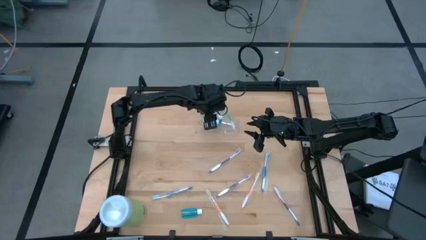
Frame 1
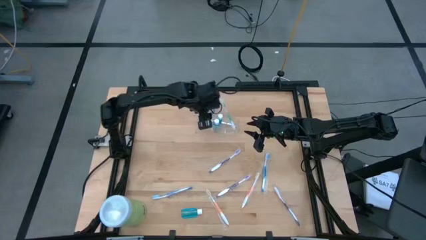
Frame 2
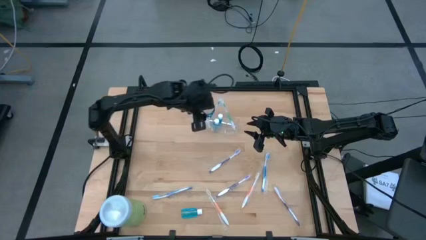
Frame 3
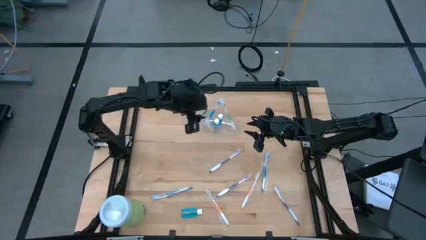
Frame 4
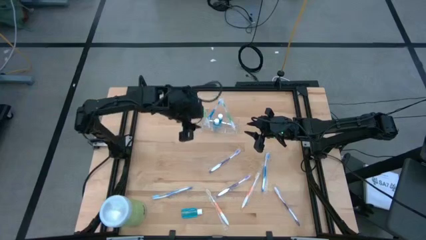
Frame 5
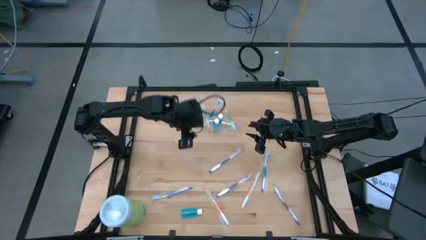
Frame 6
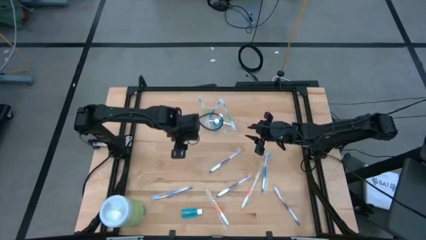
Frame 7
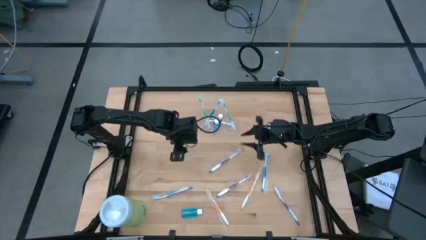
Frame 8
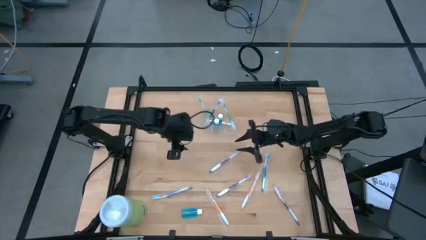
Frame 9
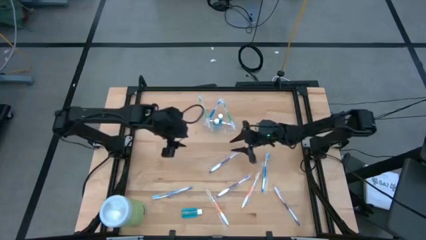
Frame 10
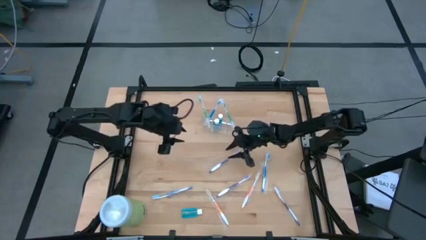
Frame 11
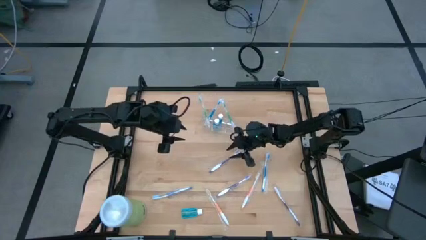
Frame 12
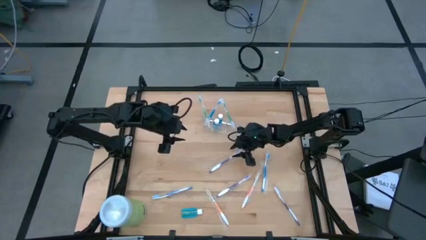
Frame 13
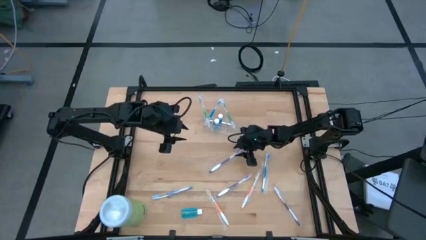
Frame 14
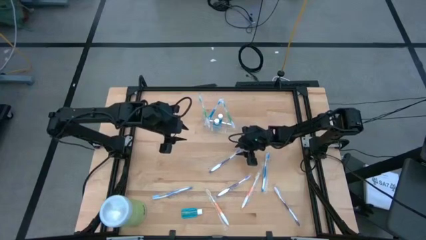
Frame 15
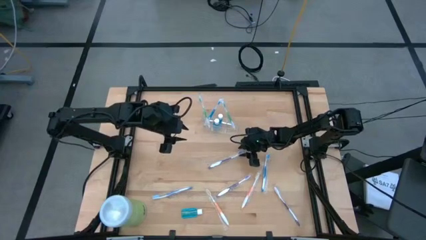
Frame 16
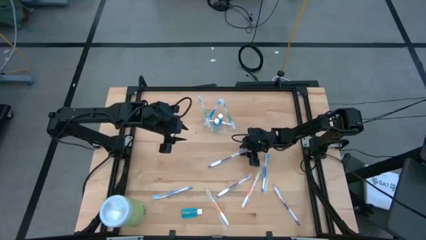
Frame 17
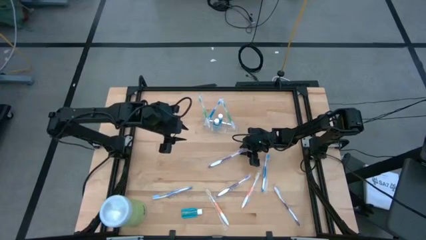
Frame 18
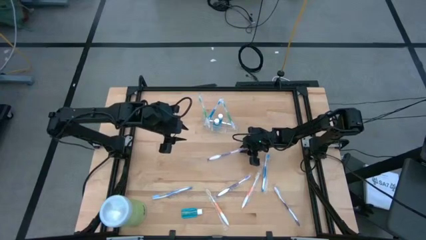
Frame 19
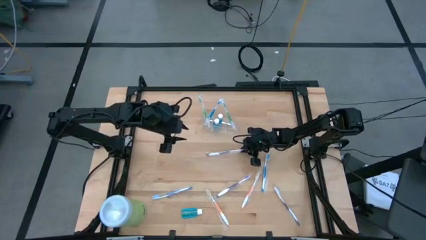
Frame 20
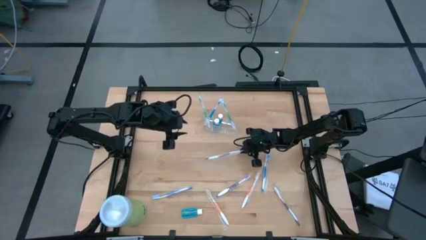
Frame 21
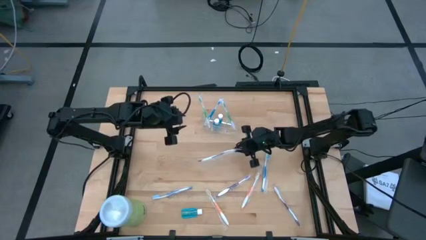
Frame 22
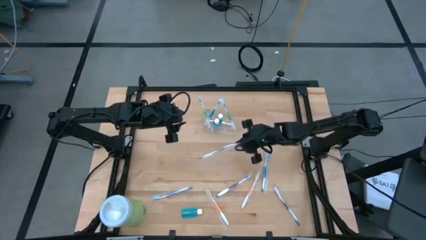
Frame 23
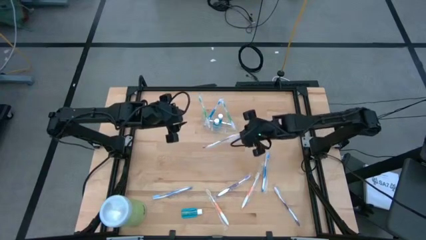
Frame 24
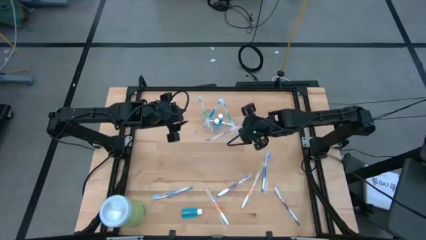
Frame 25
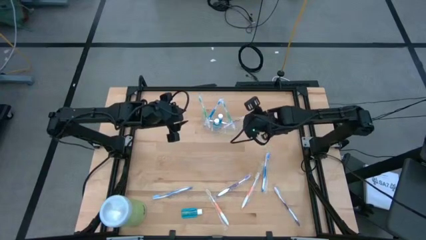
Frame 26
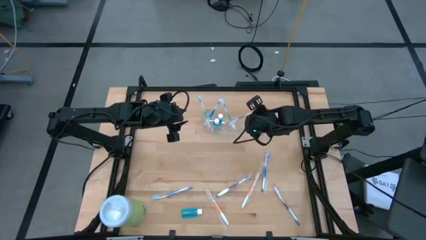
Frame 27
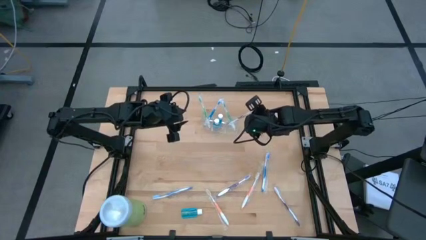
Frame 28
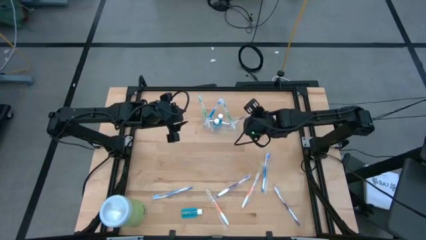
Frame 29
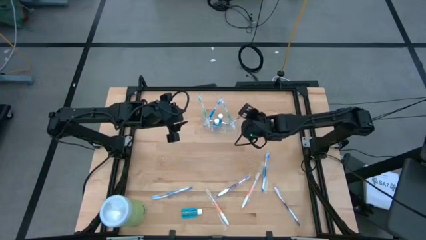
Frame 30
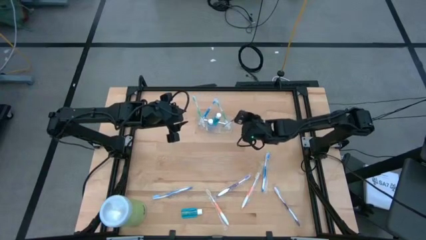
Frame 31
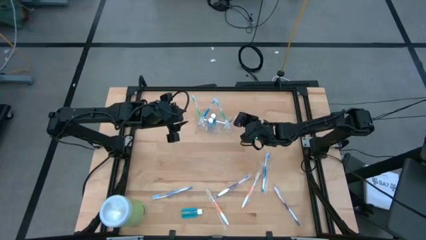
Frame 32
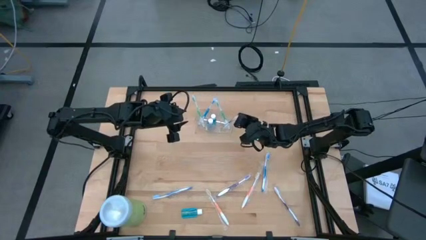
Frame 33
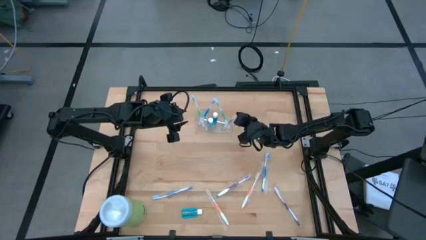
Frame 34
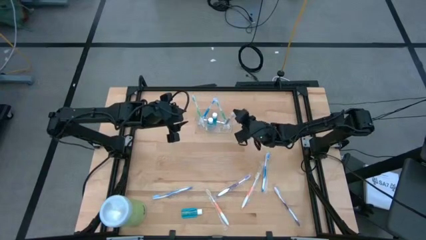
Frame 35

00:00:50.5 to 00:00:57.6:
Task: Pick & Place toothbrushing station
Put the top purple toothbrush into the right section of the transparent organizer

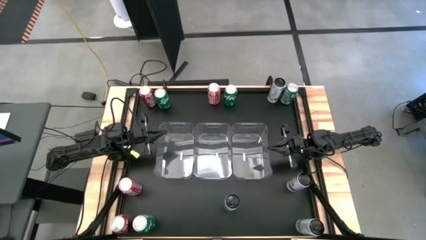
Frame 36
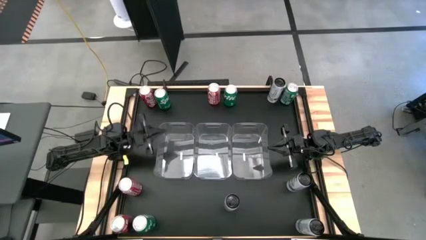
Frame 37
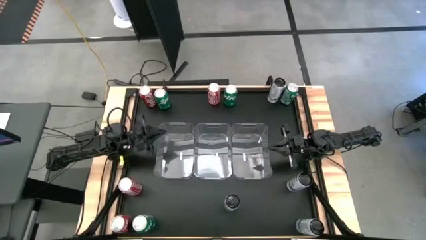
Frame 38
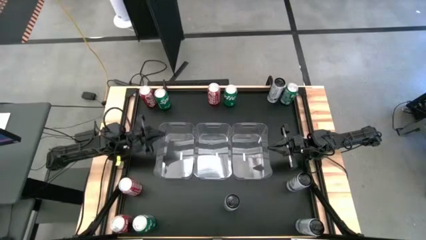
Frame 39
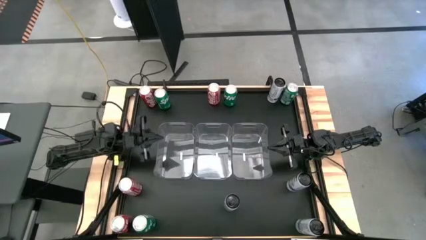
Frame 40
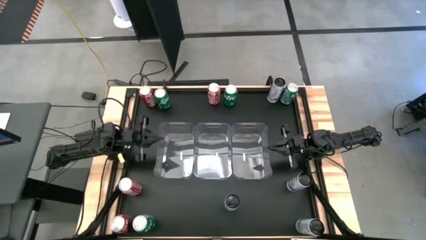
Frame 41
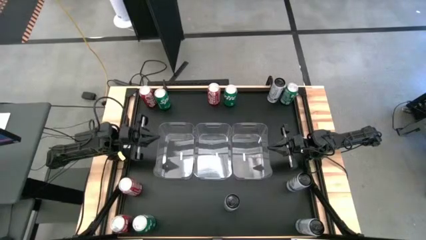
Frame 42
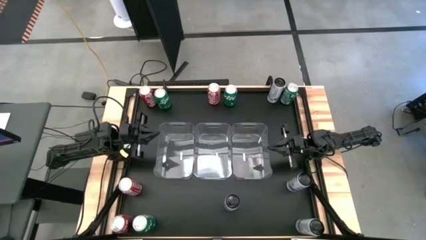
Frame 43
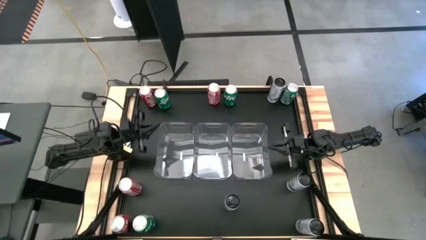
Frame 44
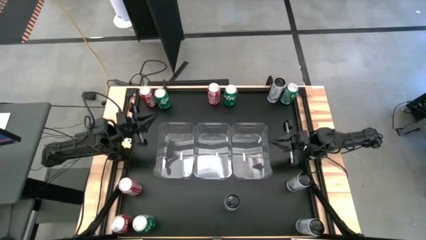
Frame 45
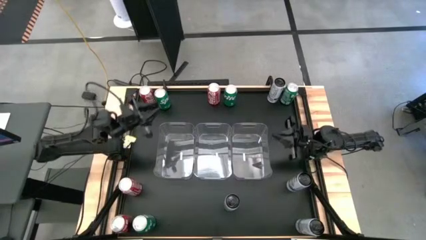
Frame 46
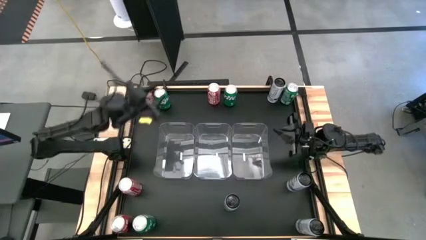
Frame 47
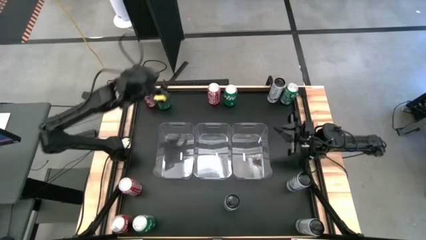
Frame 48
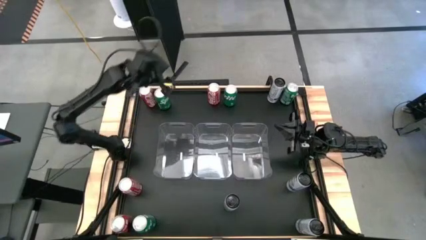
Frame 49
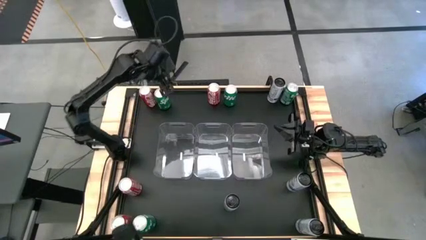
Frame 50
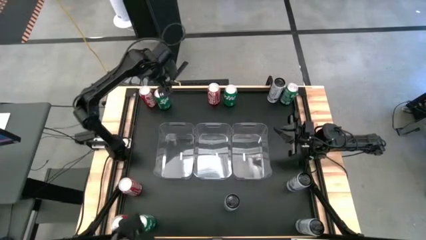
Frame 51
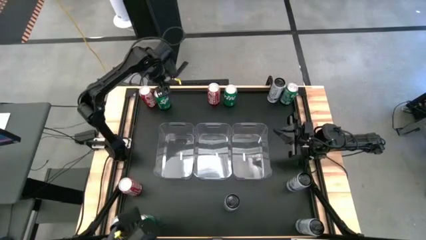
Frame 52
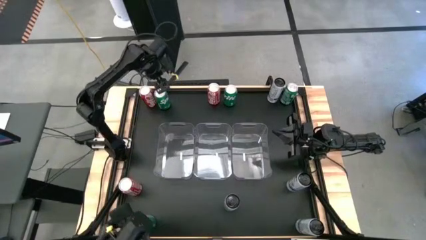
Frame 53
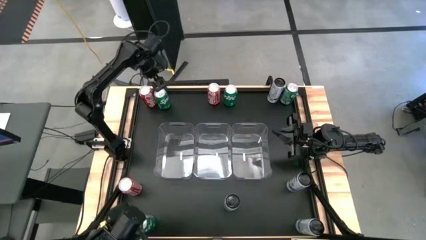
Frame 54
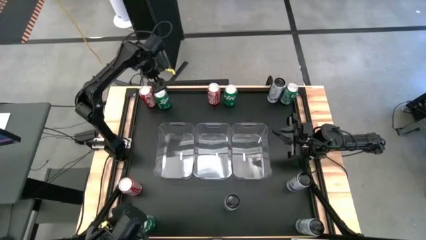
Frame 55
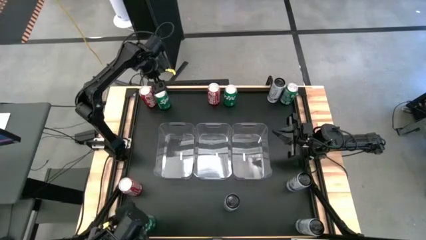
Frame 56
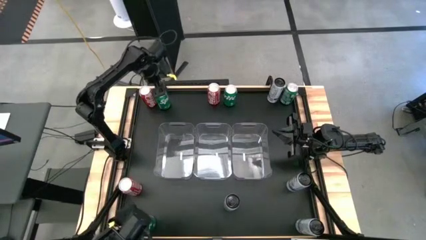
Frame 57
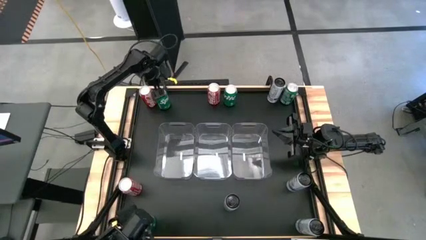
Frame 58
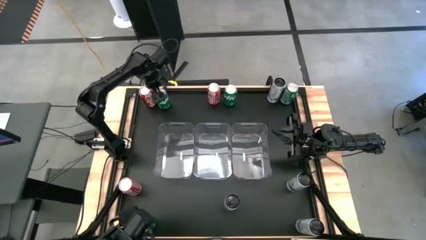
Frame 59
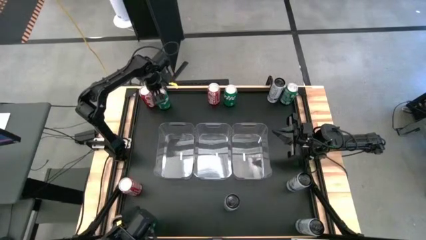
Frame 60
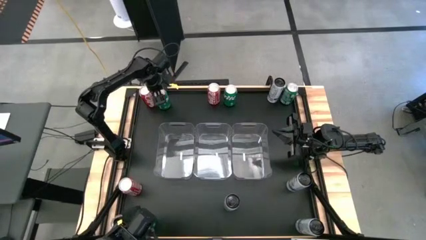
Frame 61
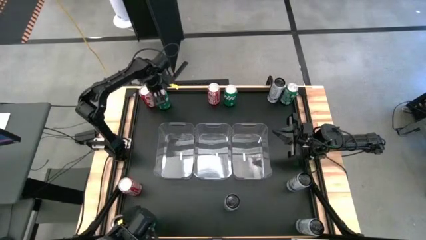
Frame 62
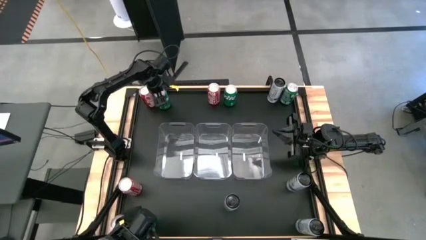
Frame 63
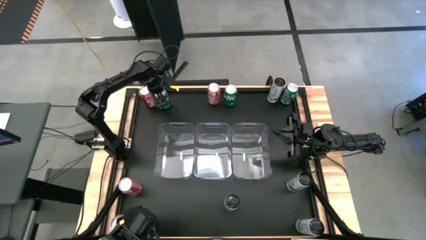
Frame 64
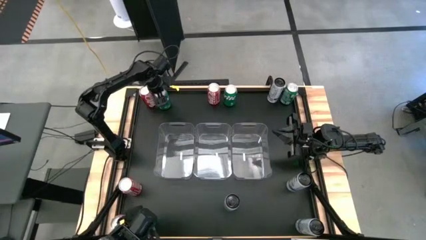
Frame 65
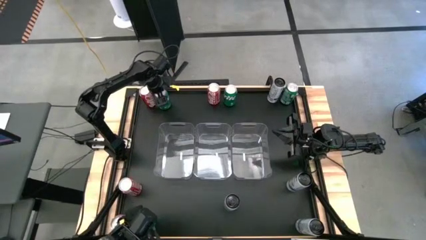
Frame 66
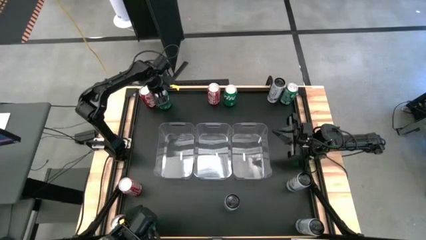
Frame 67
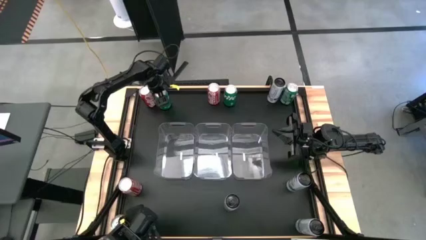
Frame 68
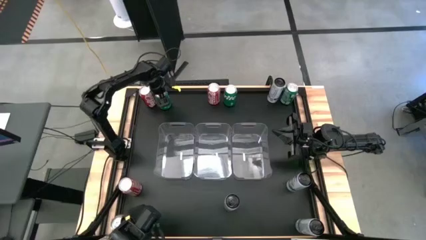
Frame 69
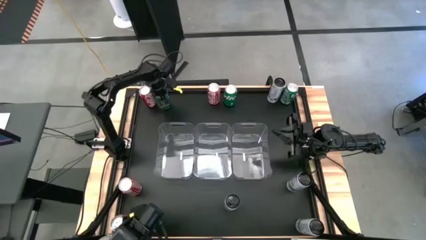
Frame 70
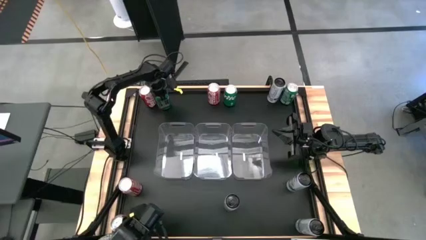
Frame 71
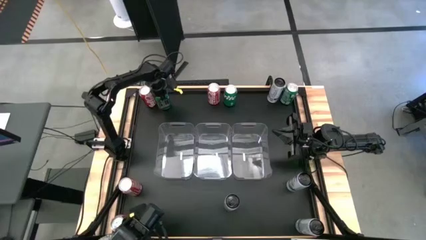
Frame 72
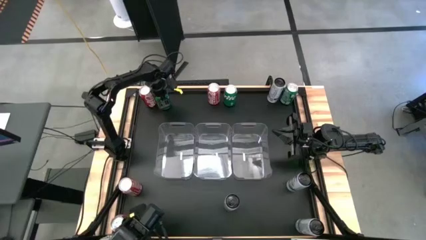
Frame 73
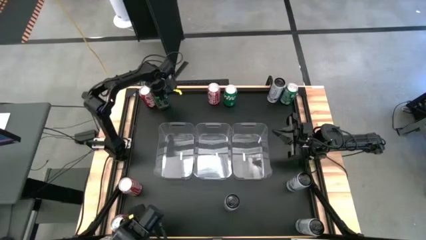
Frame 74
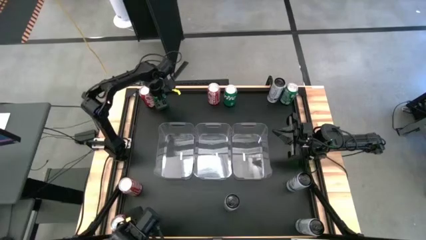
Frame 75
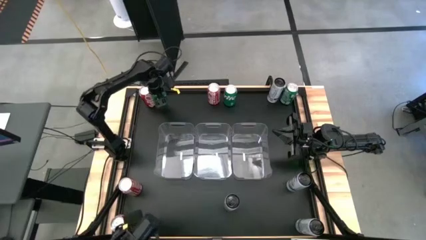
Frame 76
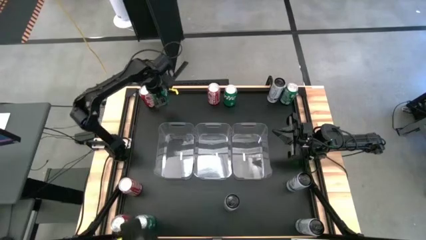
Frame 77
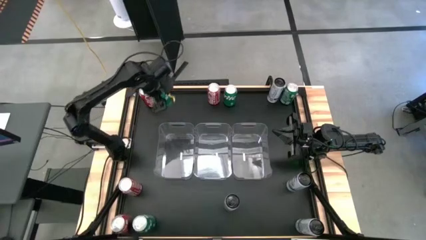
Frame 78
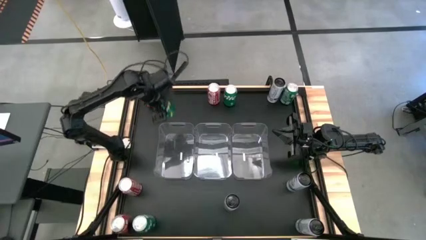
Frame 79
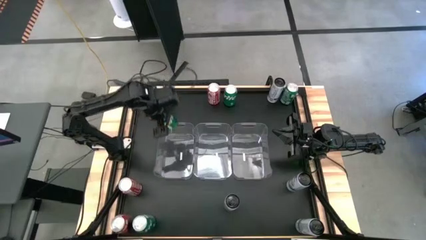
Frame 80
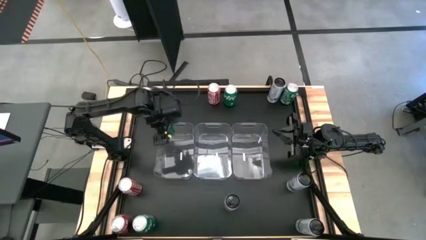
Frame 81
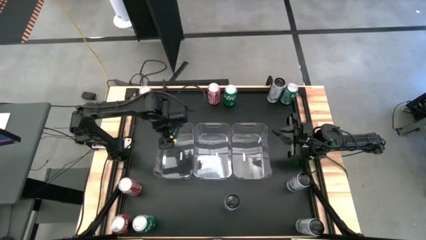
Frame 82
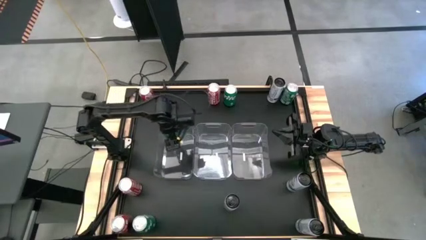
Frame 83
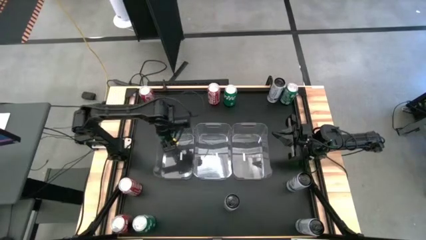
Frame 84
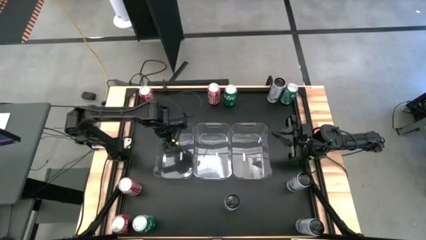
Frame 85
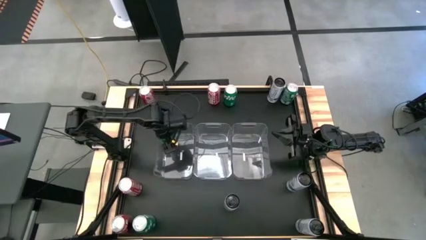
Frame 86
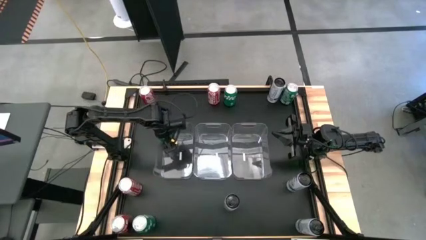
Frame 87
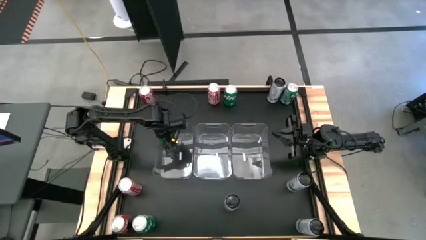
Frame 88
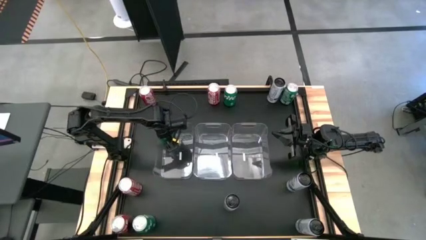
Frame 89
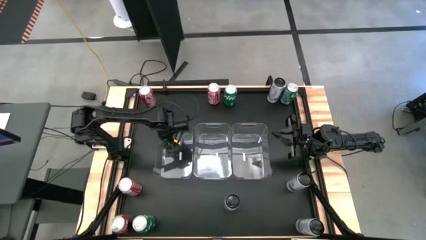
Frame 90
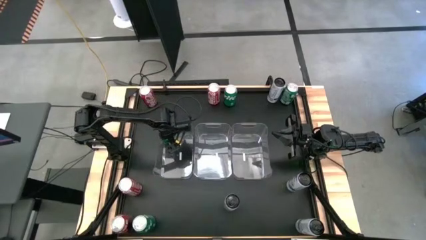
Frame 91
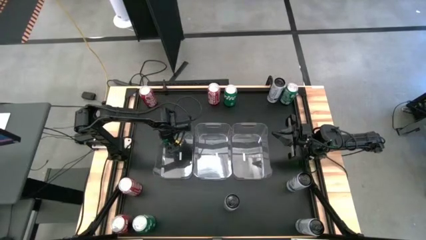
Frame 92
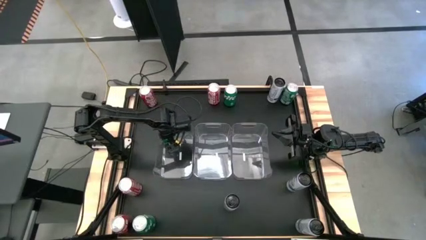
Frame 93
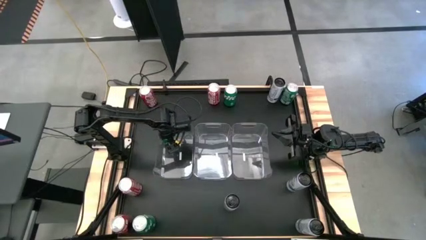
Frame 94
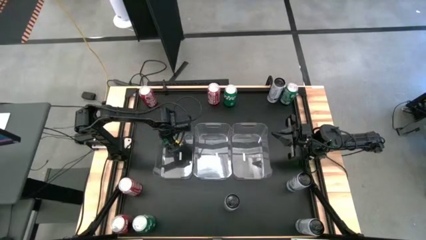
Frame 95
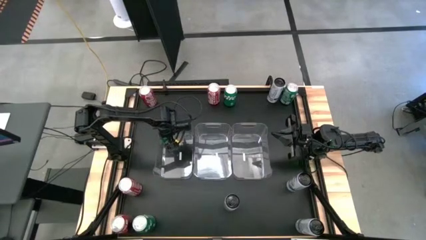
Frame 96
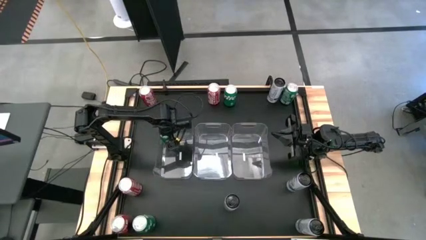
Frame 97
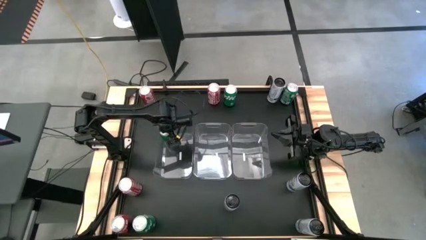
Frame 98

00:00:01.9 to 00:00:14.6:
Task: Sort soda cans
Put the top left green soda can into the left transparent bin
